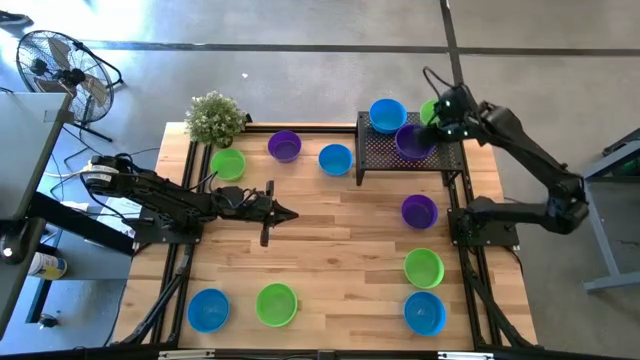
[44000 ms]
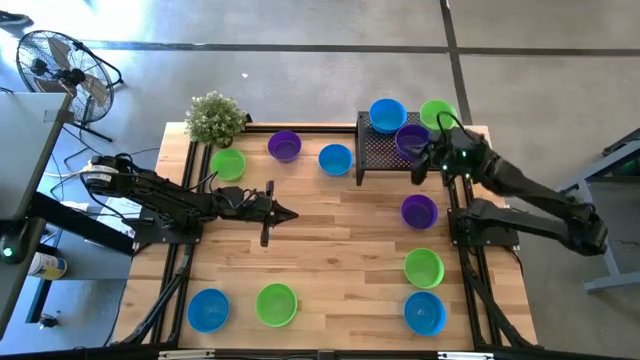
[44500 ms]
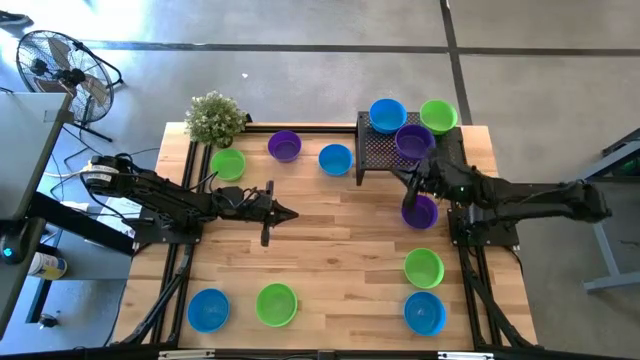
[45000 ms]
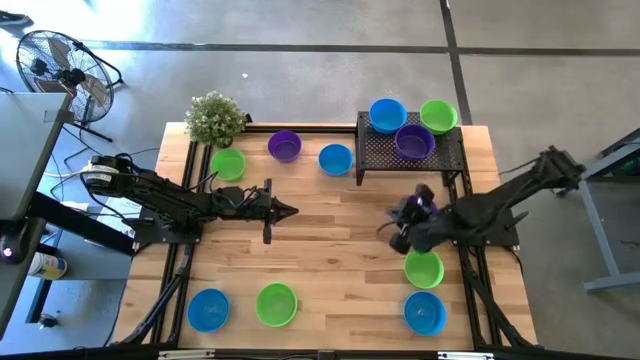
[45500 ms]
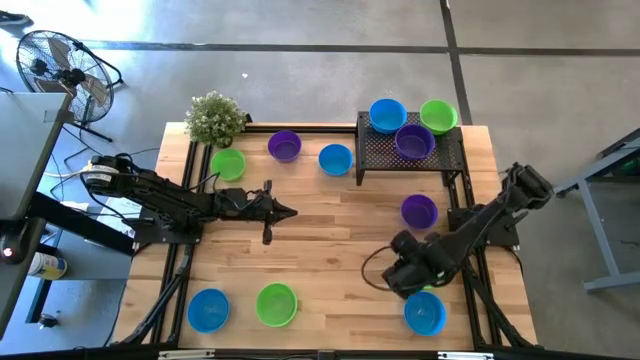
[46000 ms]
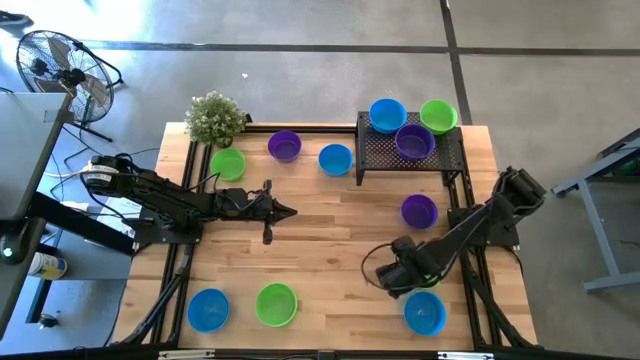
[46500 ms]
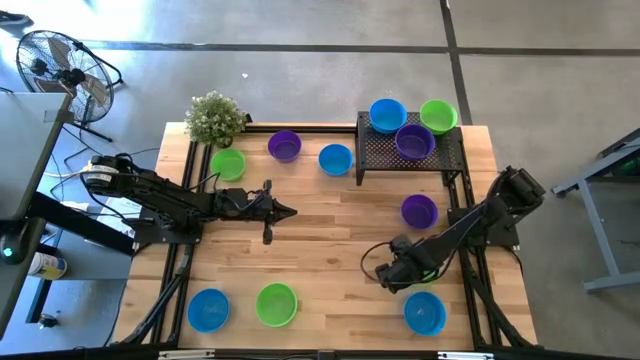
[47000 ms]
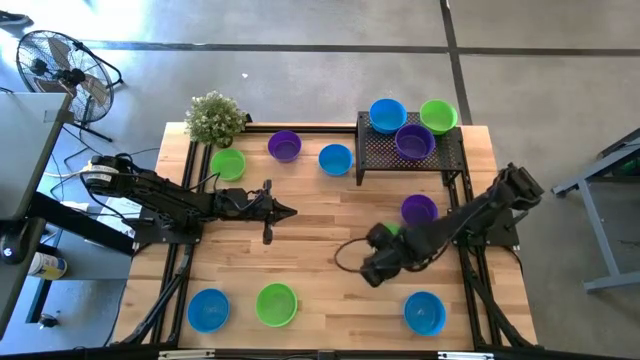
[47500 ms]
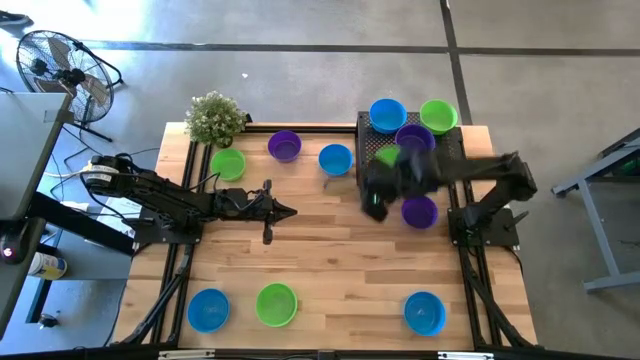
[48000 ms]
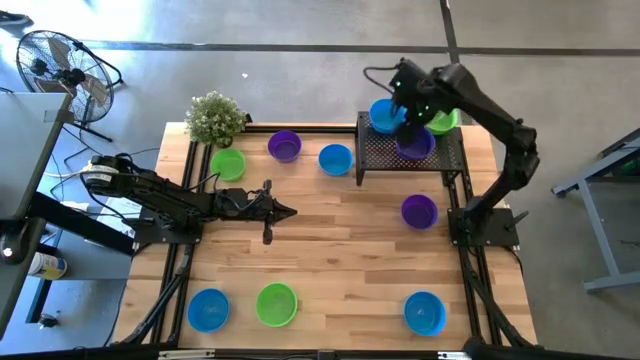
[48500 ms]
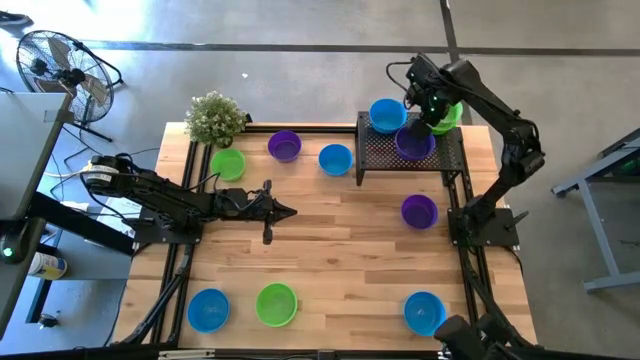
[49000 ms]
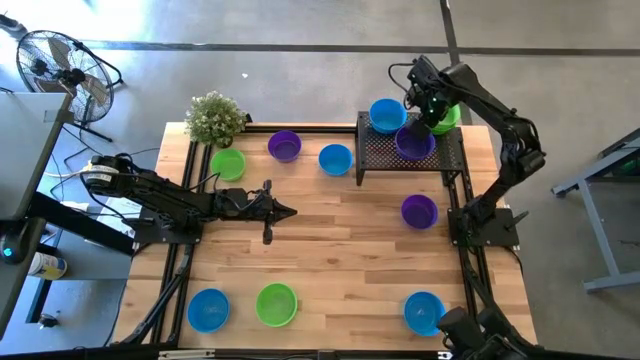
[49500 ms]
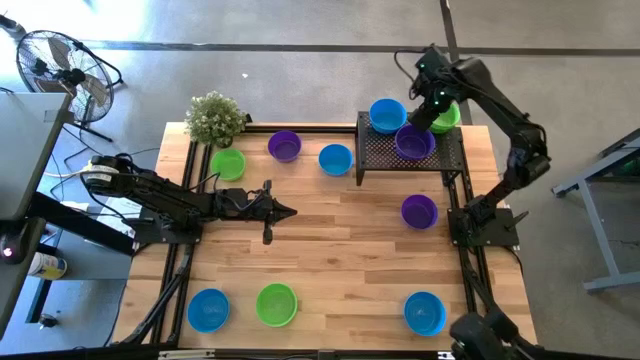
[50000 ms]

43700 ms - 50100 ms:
Task: Pick & Place Mini bowls
Stack the green bowl on top of the green bowl on the shelf

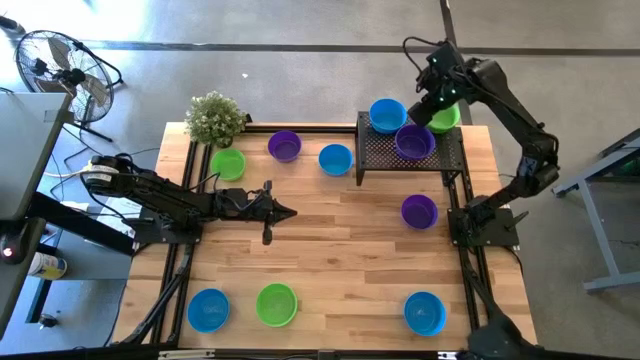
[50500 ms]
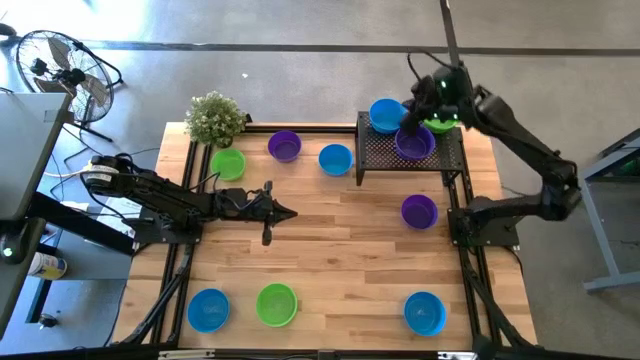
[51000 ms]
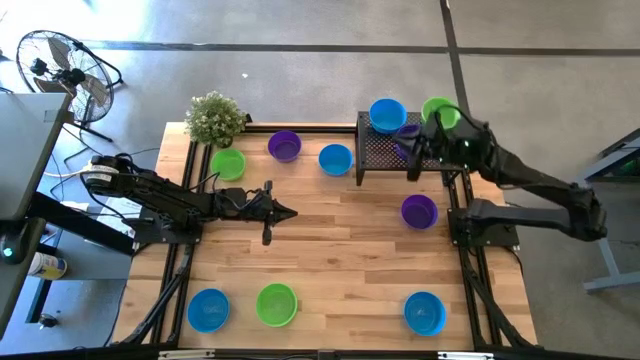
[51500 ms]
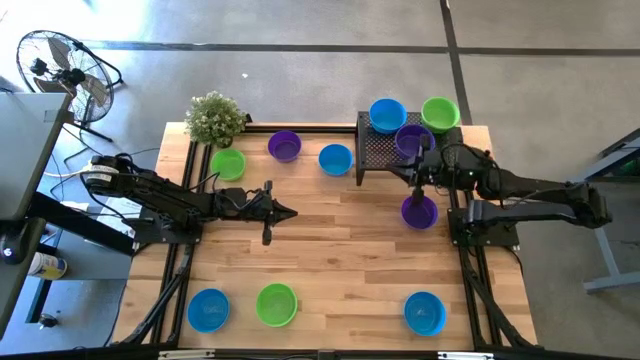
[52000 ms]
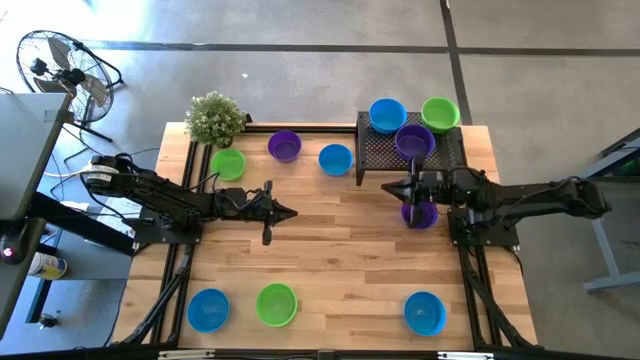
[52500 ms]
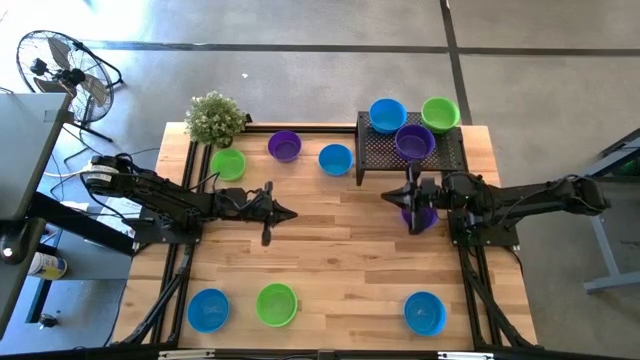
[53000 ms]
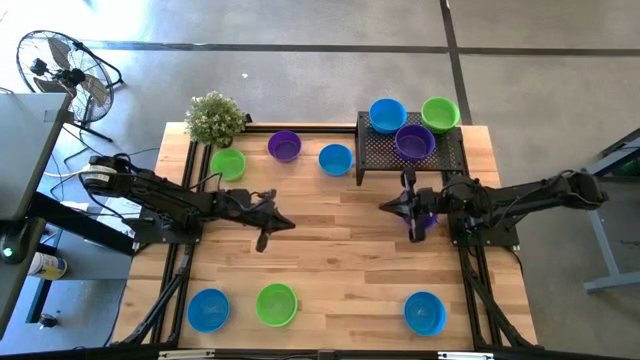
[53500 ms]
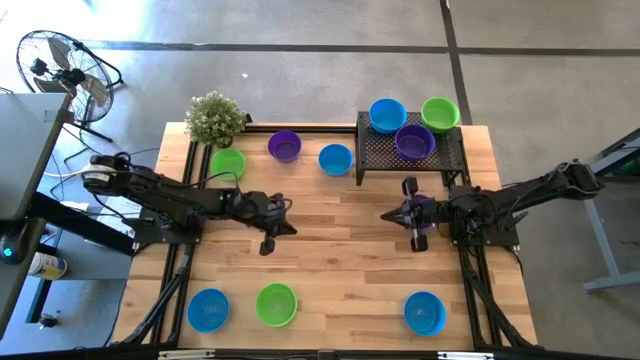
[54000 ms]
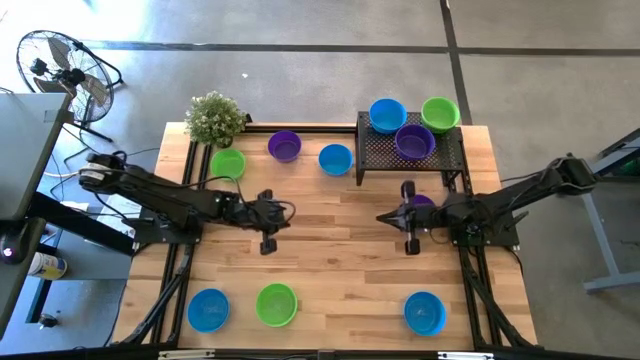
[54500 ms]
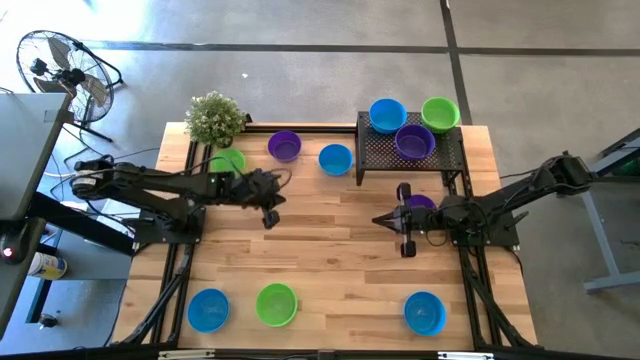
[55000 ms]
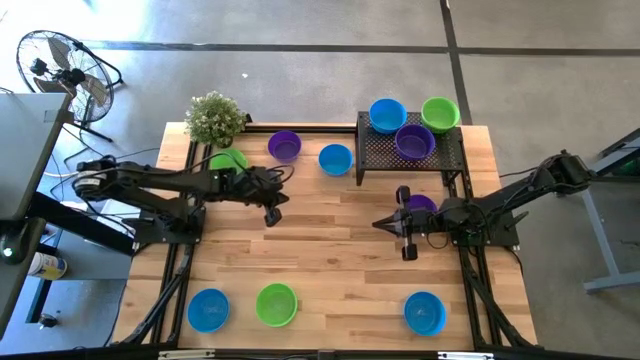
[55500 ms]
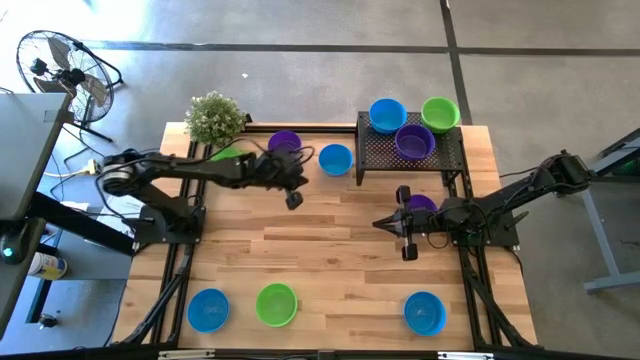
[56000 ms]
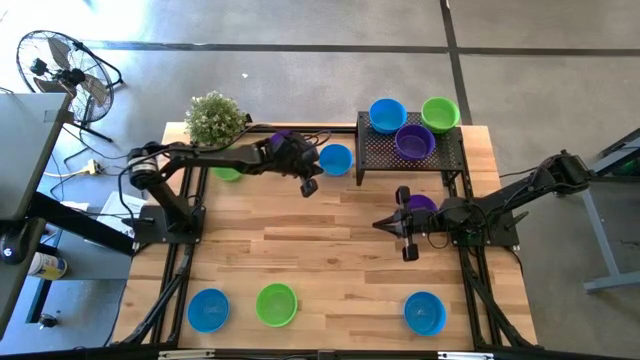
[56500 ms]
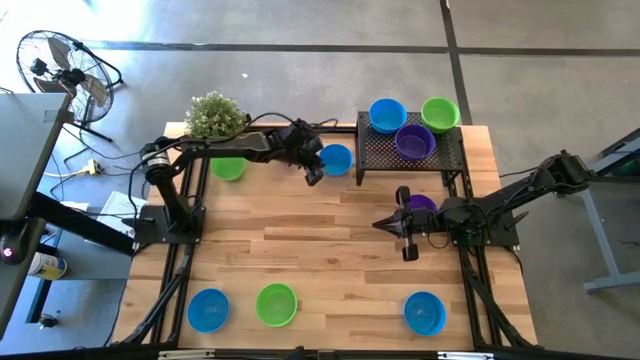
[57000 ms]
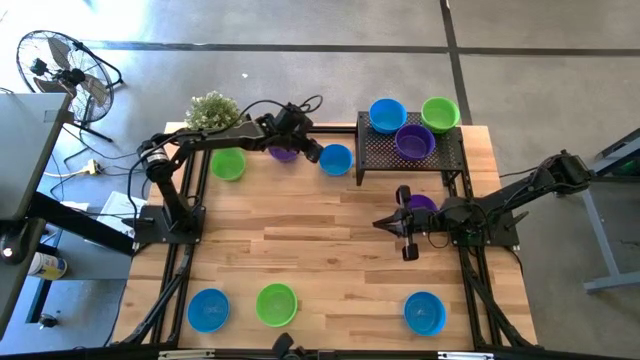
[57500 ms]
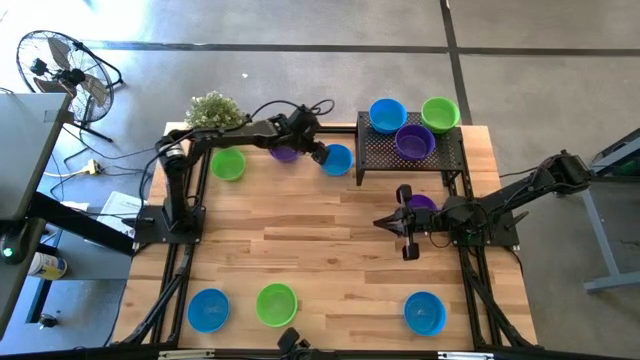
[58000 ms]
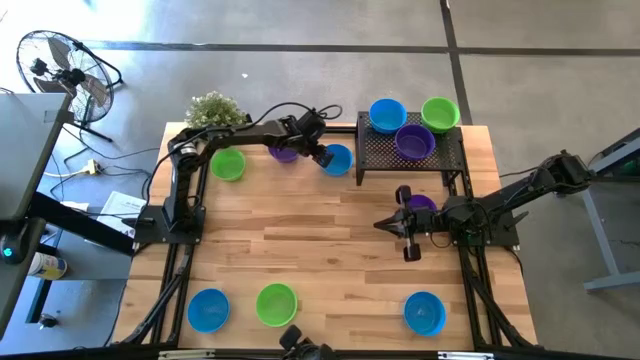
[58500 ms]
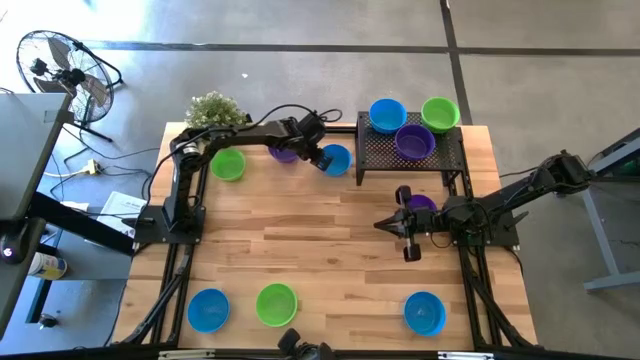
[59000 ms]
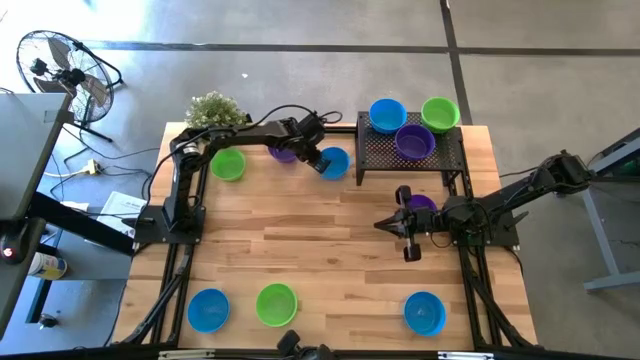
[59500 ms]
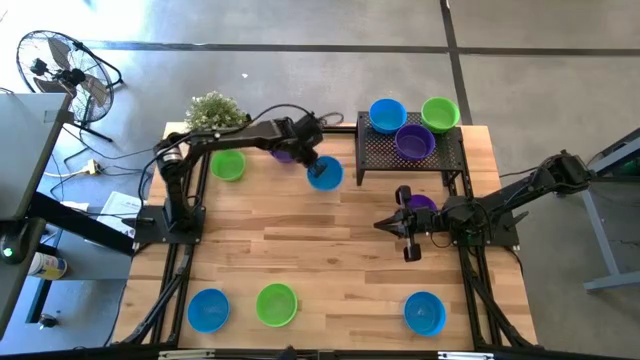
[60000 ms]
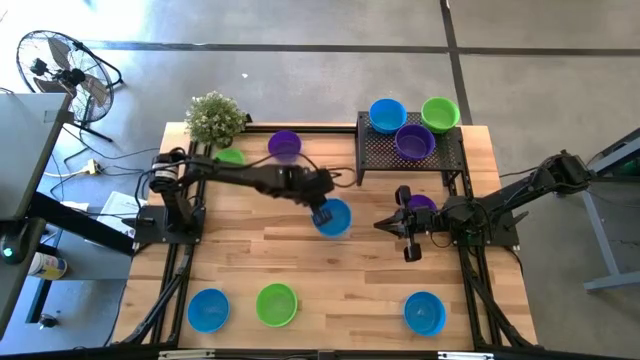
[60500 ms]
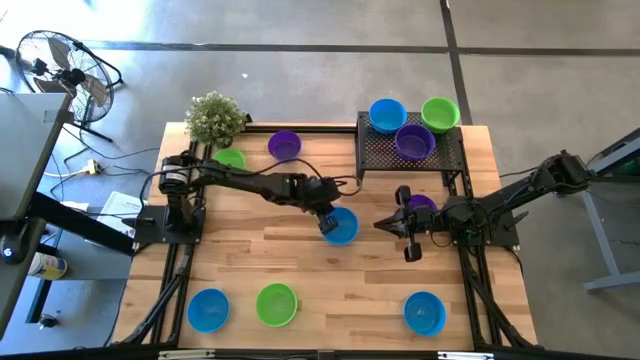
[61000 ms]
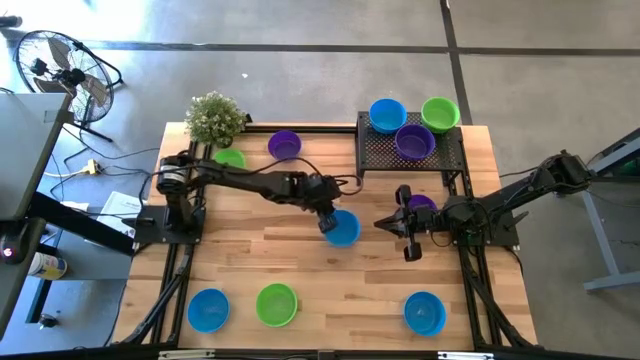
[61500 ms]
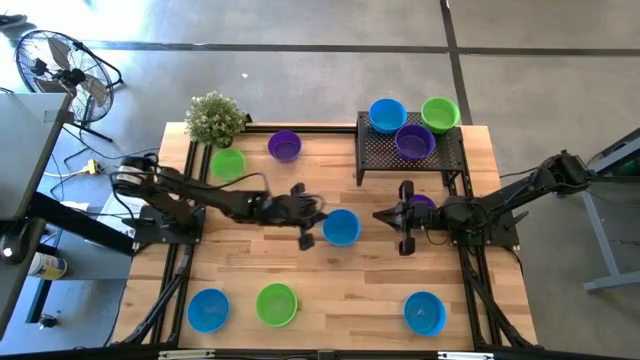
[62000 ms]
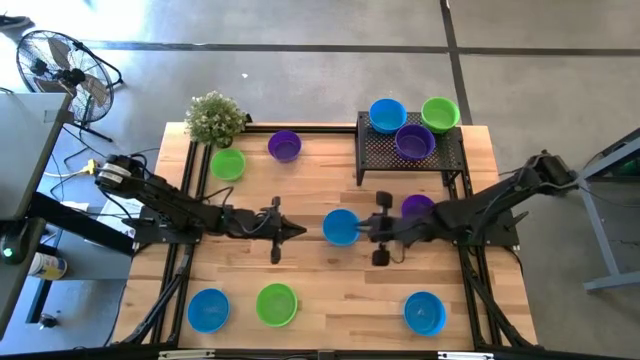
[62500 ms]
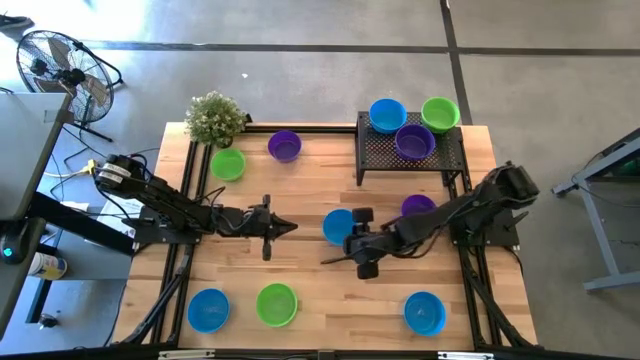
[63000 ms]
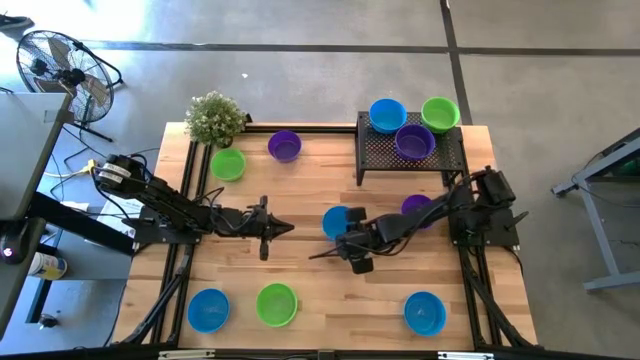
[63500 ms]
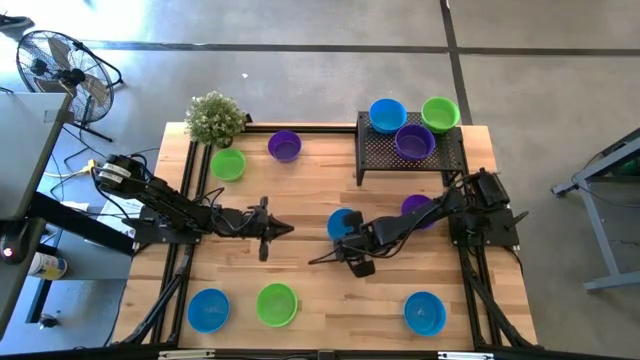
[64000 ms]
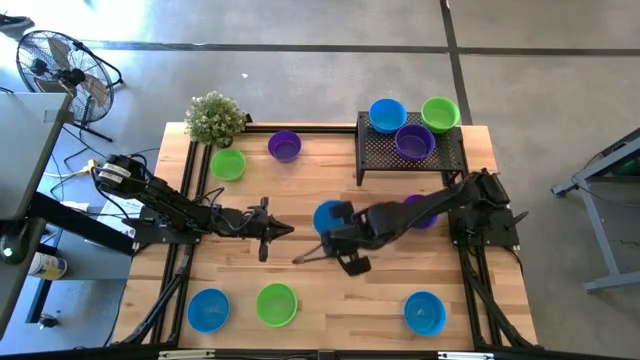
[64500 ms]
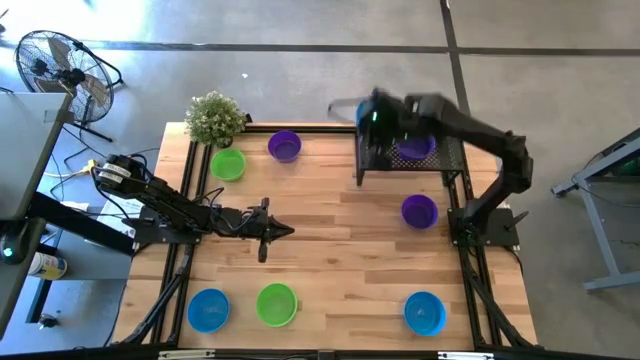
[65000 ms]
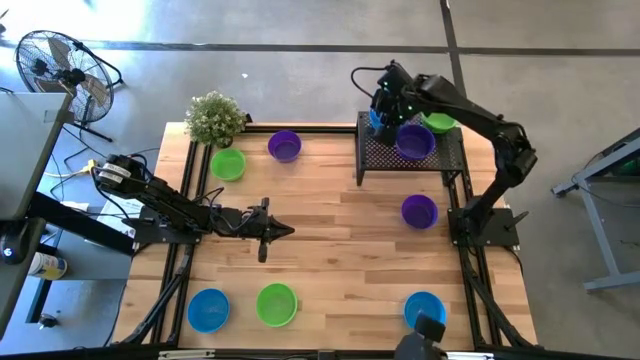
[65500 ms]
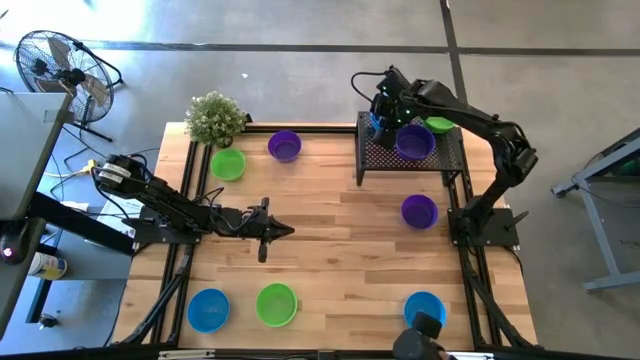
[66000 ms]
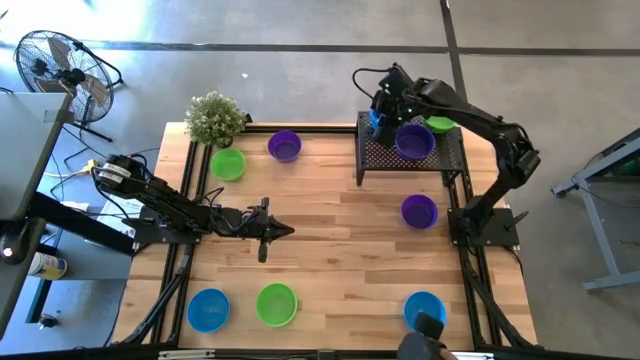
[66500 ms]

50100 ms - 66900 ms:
Stack the blue bowl on top of the blue bowl on the shelf
